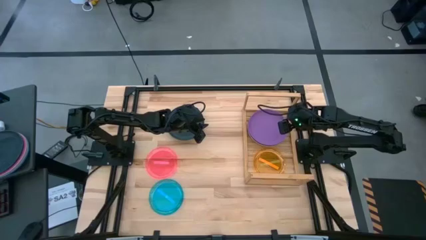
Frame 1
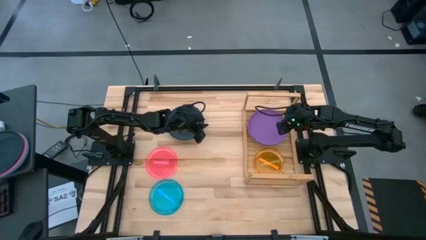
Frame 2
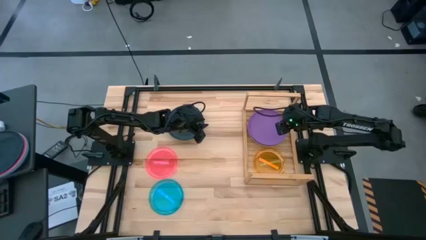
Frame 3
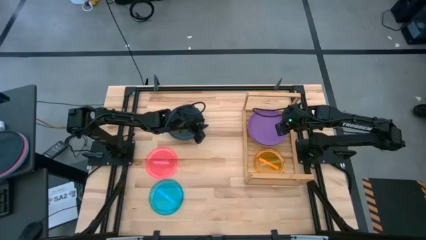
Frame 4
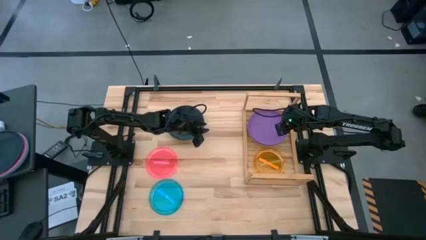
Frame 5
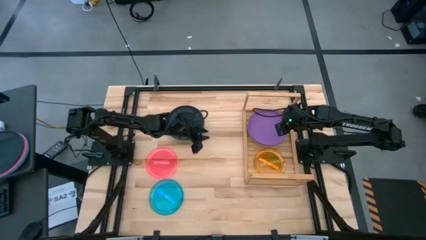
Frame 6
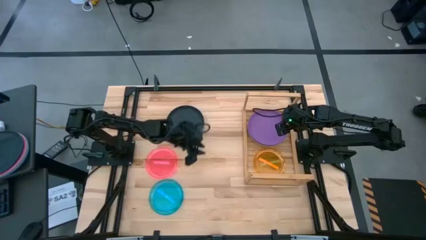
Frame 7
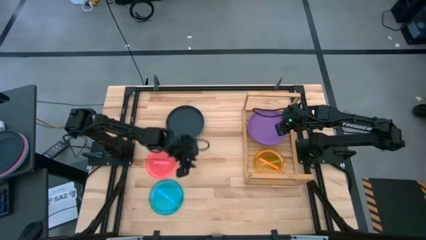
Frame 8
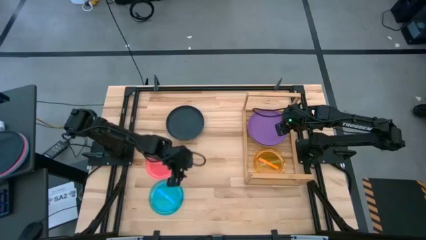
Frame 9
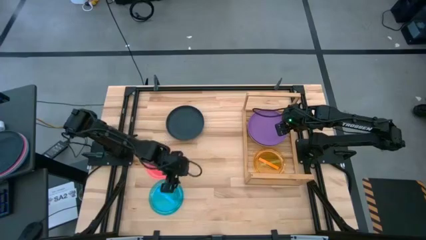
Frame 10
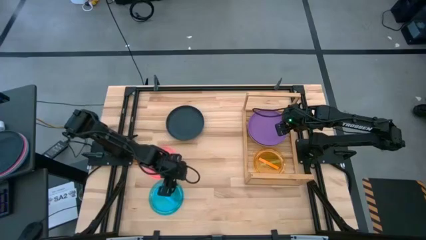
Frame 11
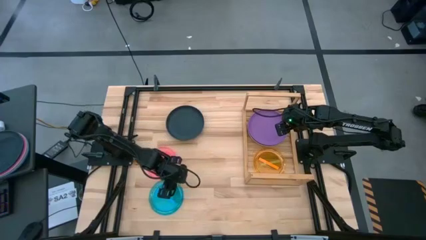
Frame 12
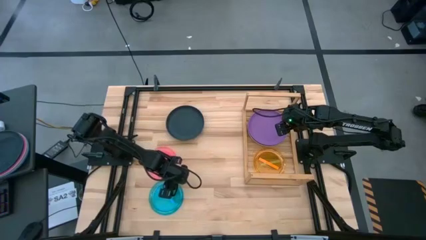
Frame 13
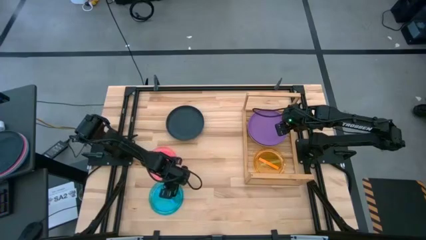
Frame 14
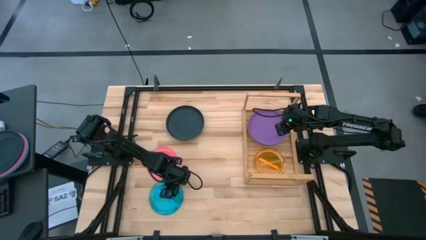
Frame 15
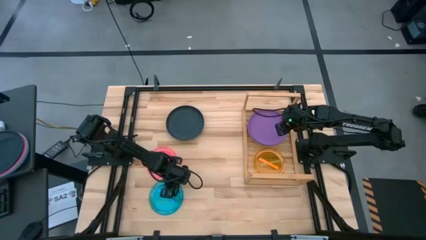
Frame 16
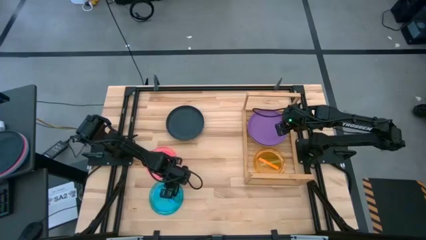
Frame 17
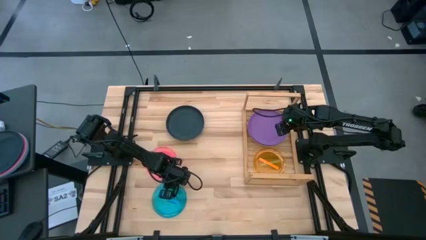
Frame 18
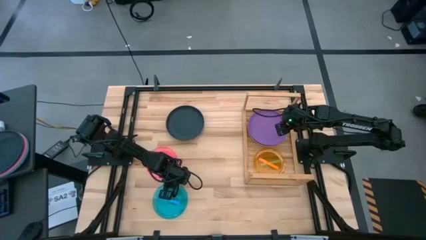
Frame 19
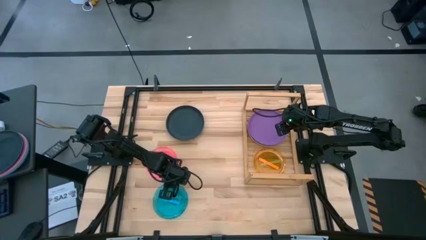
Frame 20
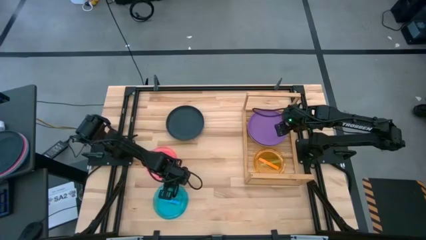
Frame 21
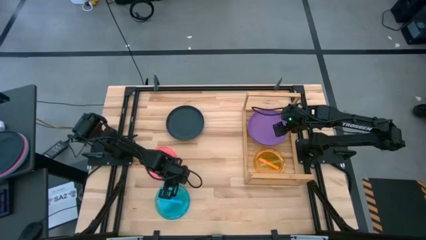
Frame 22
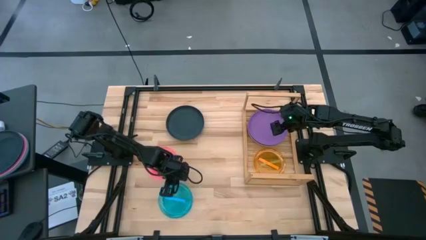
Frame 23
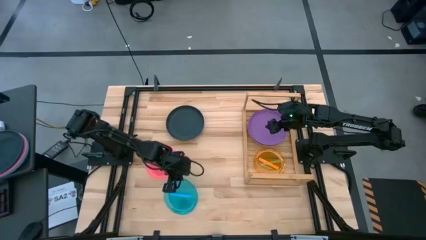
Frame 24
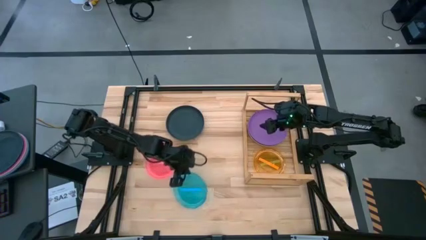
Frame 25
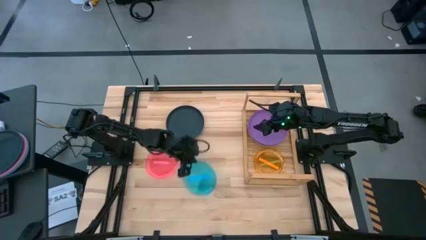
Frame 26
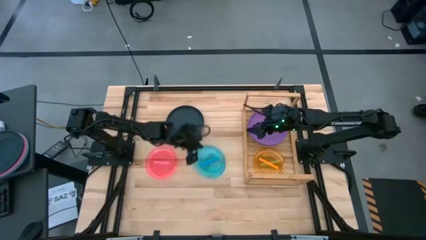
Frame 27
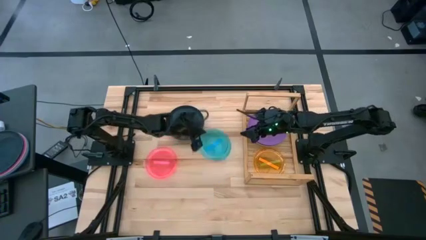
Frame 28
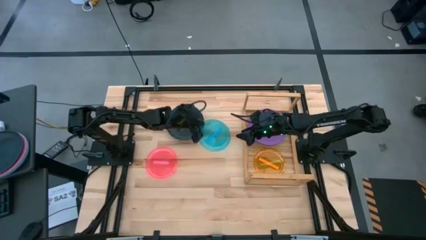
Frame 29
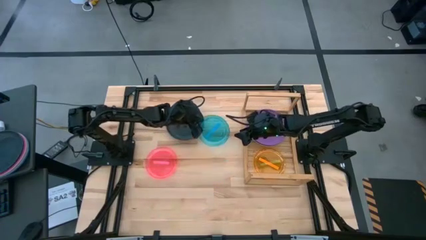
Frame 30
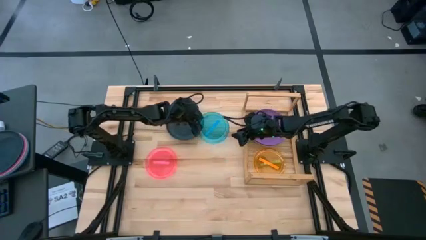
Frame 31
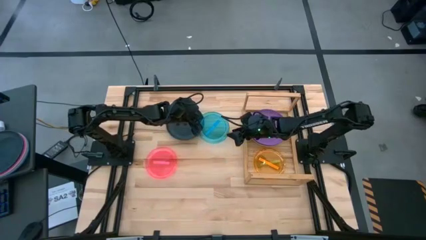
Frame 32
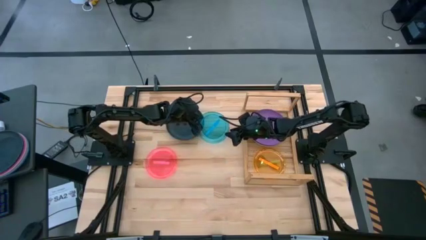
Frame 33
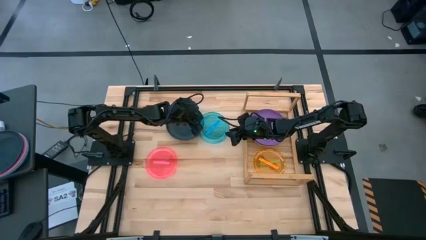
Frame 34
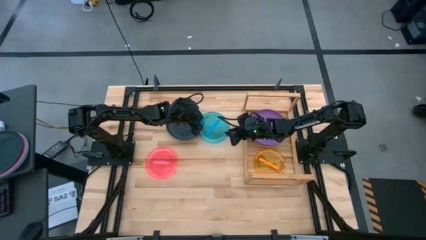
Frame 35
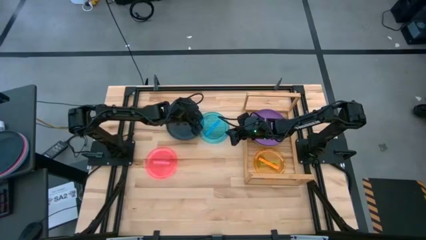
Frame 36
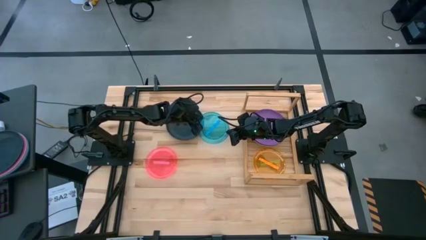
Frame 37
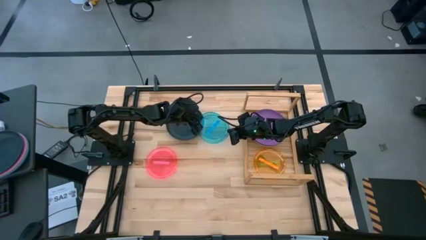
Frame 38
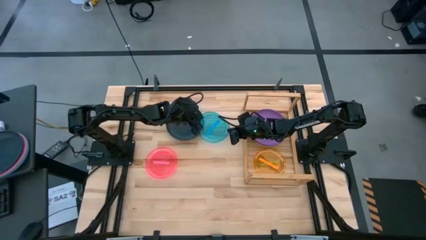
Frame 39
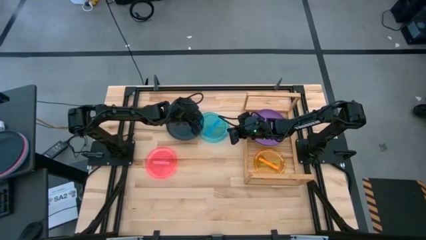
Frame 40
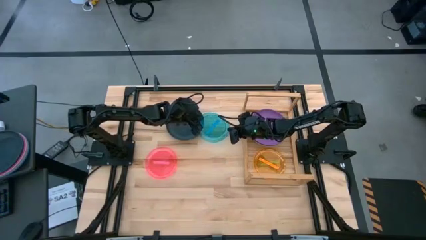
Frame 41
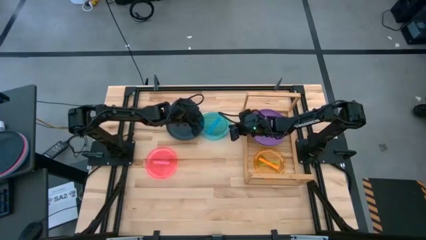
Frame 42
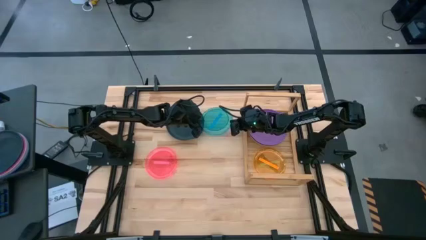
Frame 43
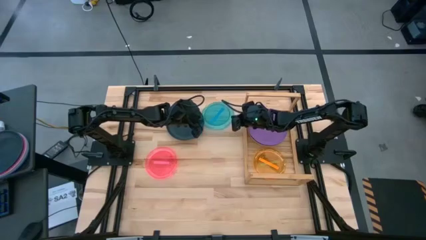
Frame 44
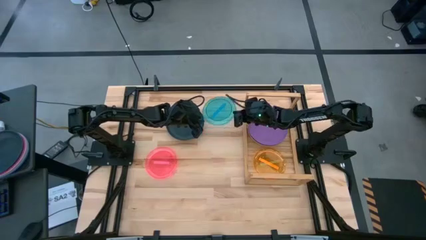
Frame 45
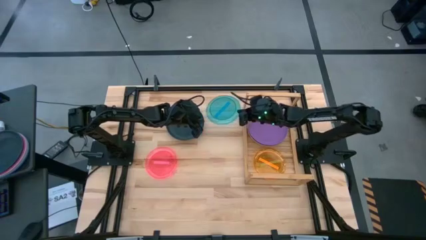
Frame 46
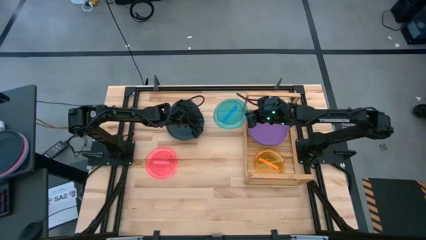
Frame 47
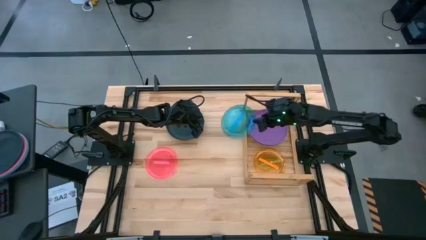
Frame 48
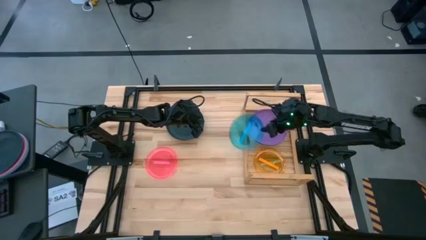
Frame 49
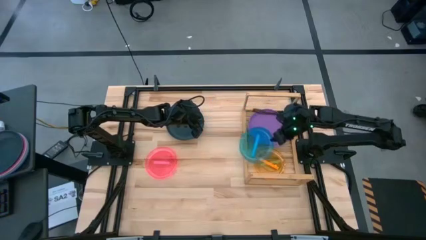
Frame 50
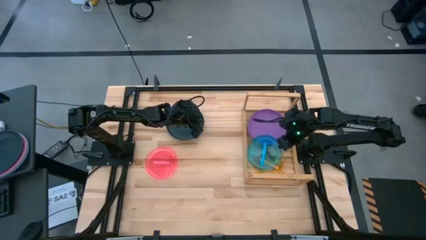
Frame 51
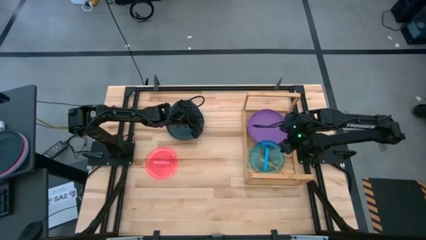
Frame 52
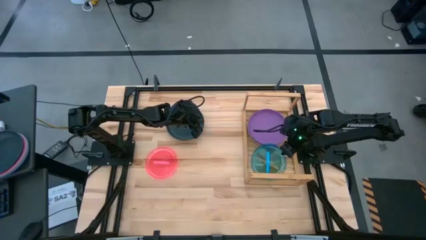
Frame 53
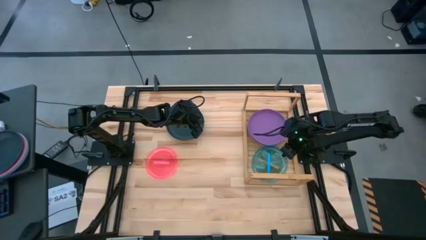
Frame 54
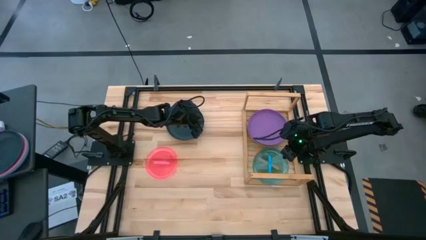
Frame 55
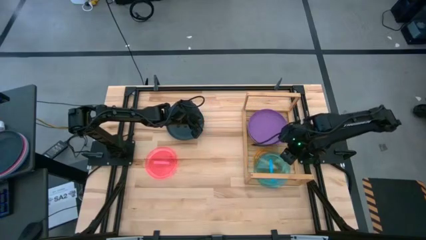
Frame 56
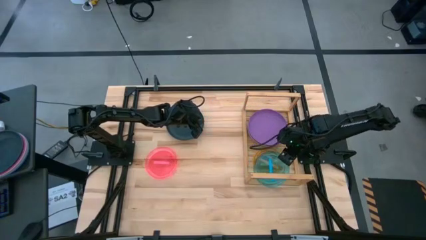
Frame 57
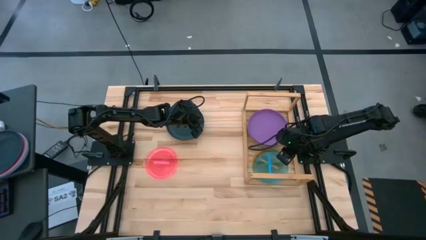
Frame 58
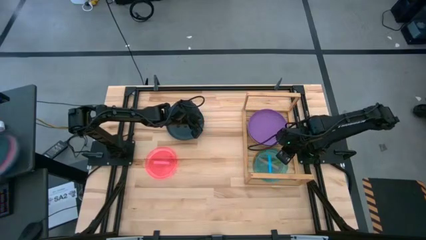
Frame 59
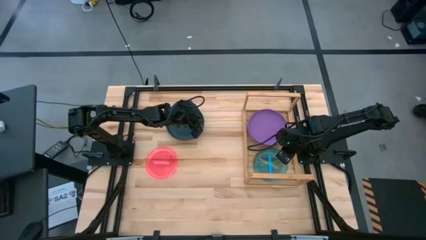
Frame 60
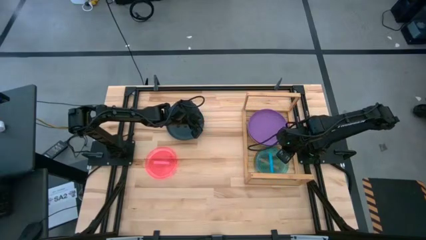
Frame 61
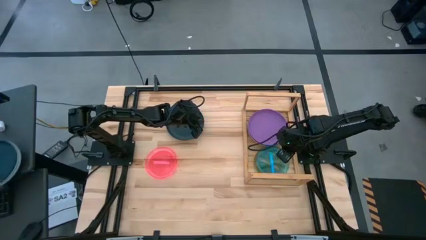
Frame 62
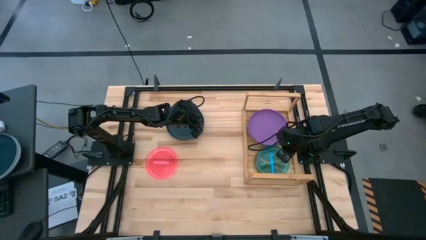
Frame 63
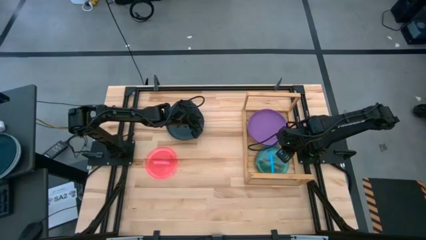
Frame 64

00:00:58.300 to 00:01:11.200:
Task: Place and stack plates onto a shelf
Stack the light blue plate on top of the orange plate on the shelf
